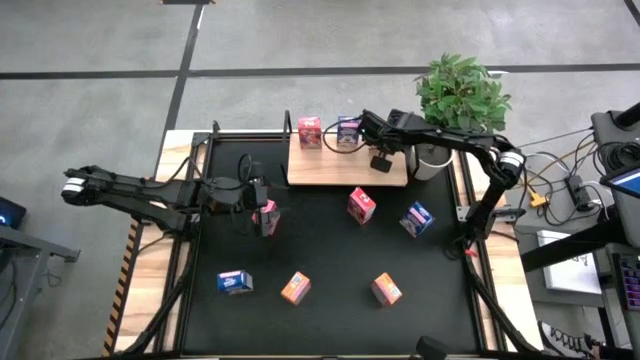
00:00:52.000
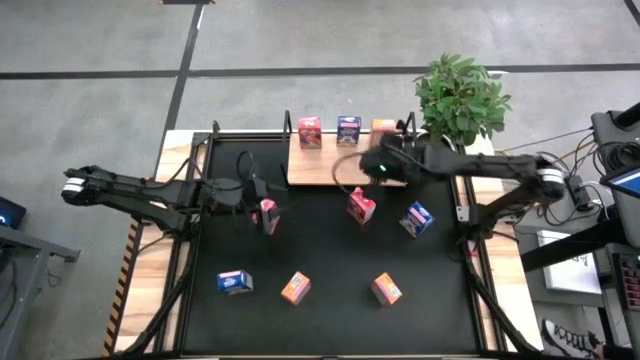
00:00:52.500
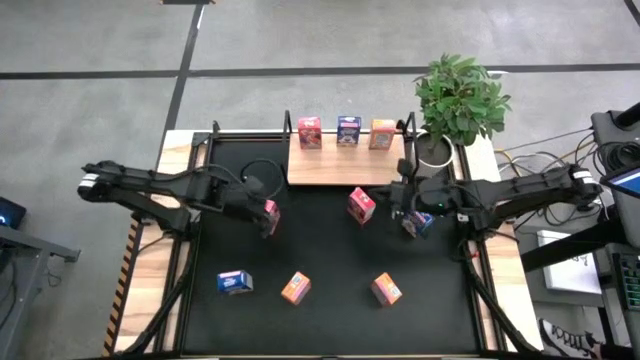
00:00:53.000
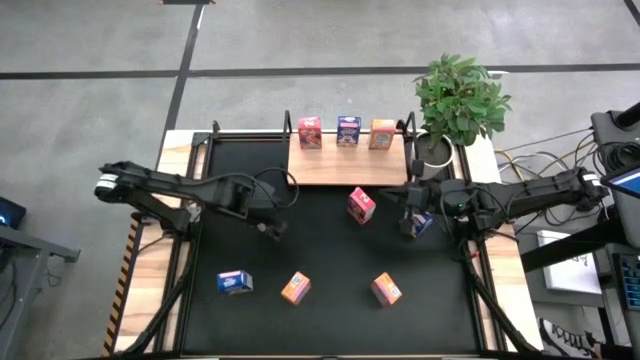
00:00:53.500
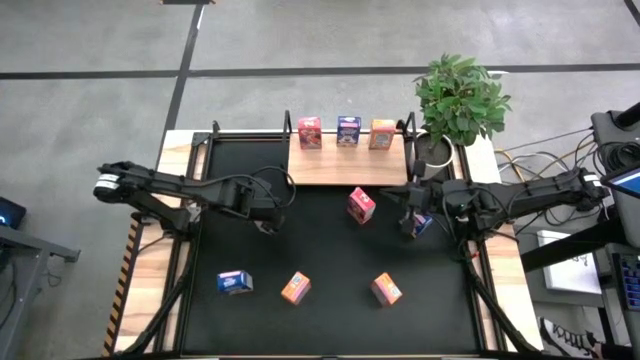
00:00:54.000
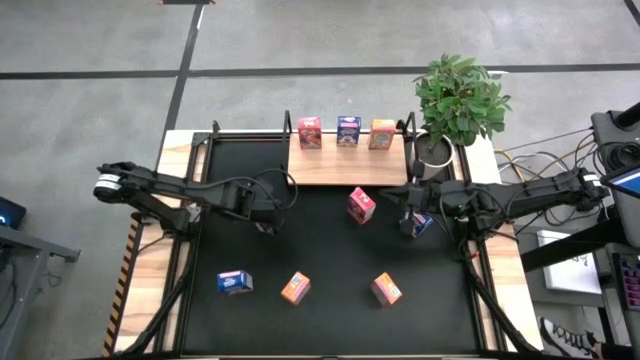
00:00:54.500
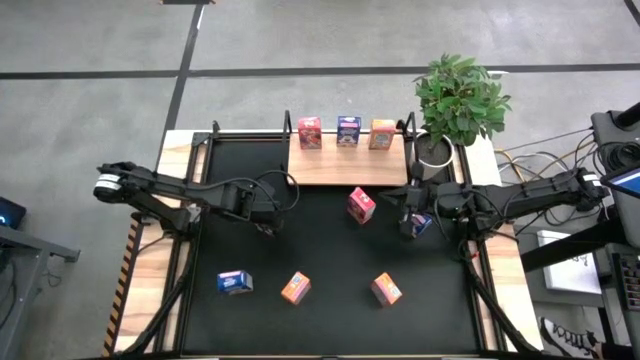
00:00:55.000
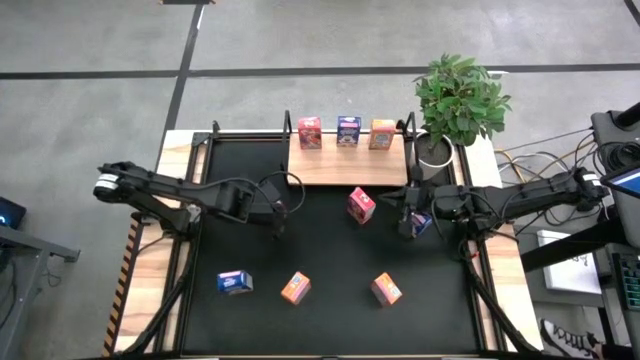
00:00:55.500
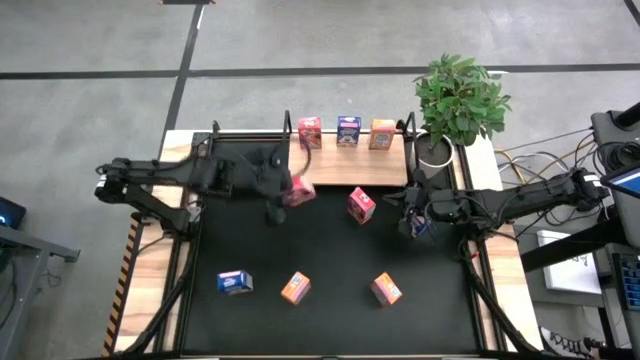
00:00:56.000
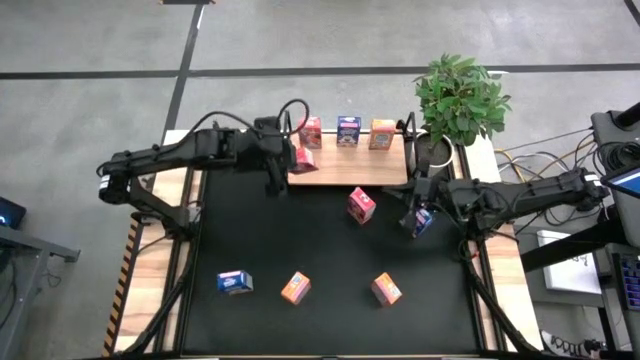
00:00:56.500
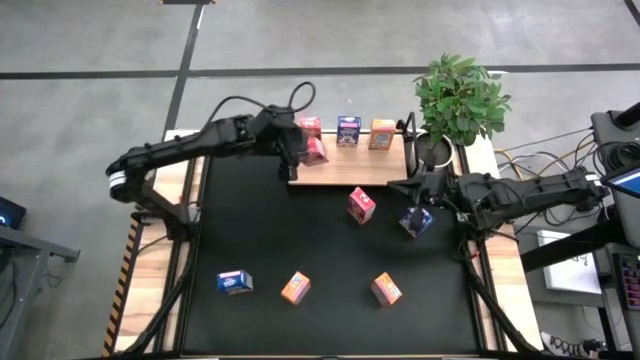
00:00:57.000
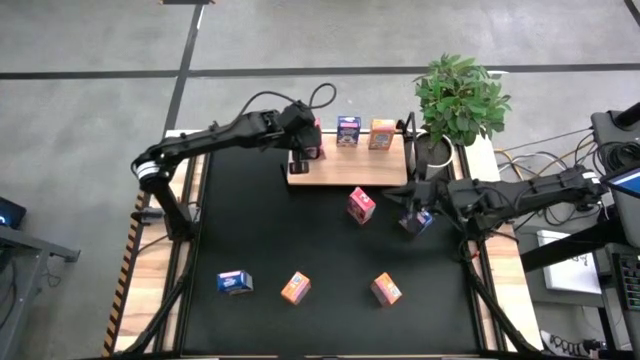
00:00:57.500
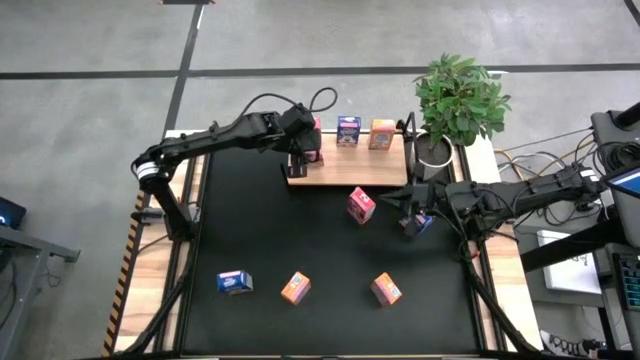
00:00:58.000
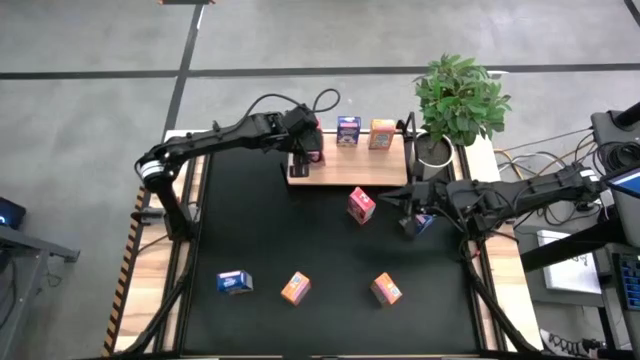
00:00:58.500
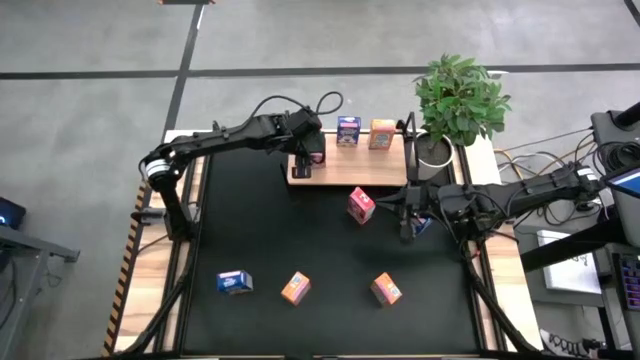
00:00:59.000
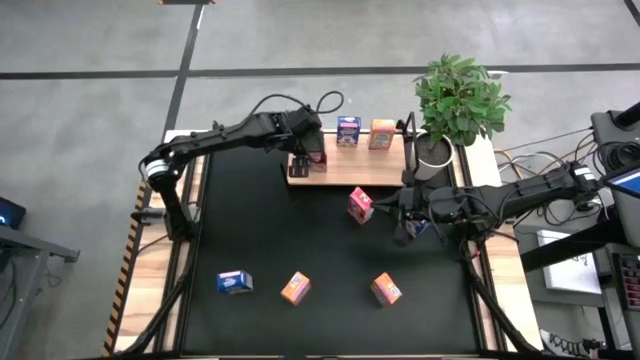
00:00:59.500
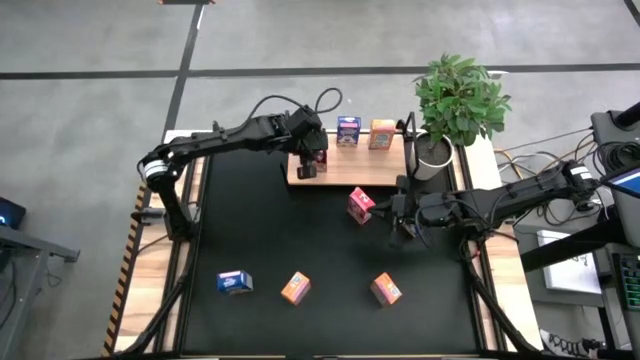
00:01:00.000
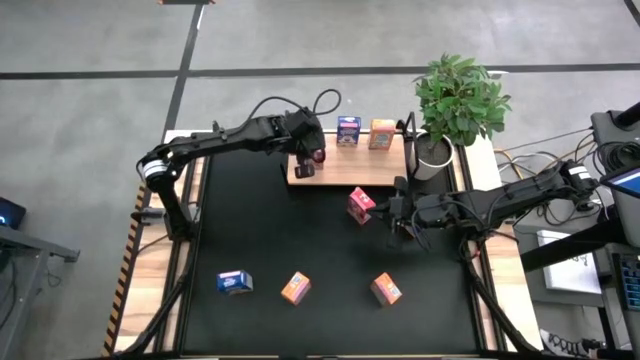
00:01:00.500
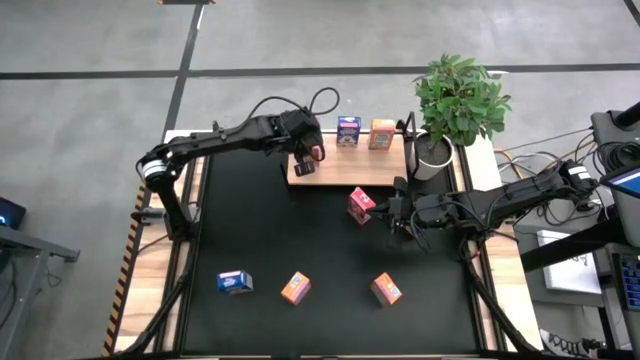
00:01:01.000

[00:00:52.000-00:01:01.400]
Task: Stack cereal on shelf
Put the left red cereal box aligned with the other red cereal box on the shelf

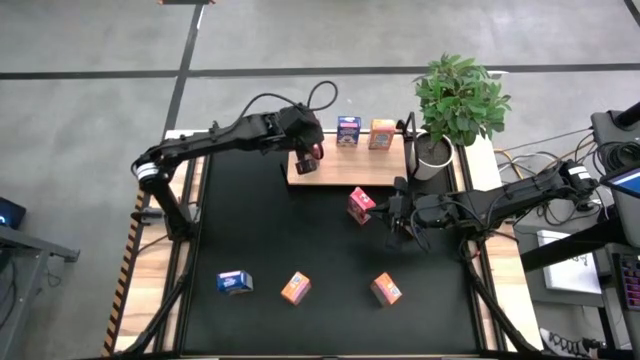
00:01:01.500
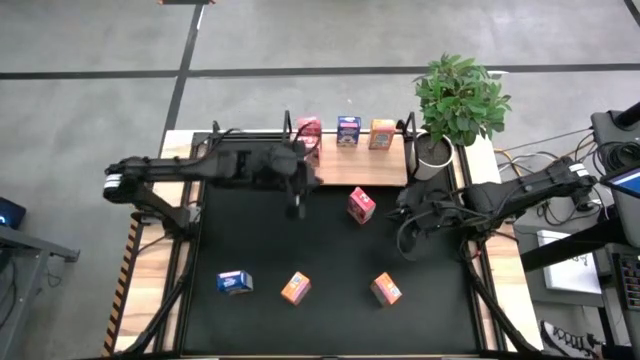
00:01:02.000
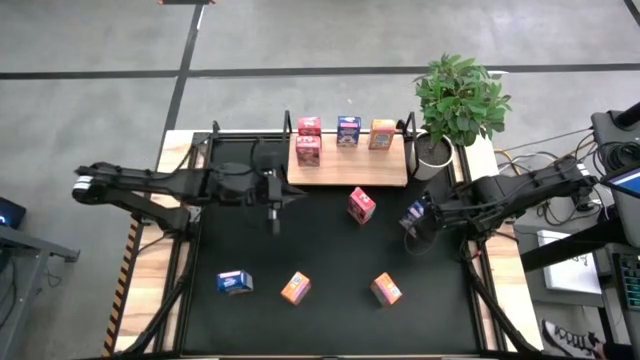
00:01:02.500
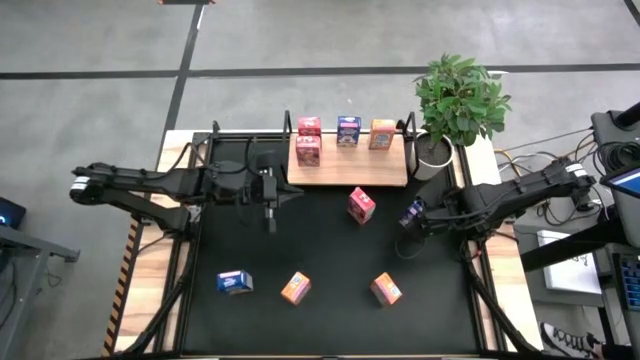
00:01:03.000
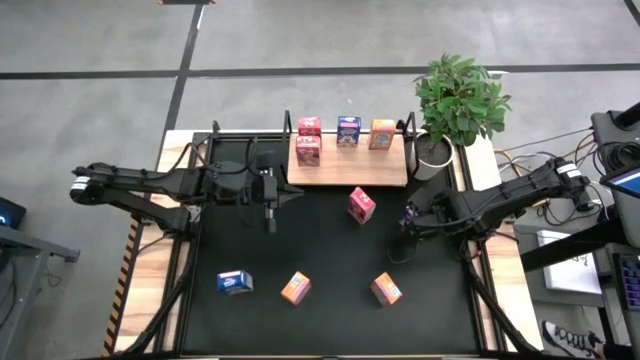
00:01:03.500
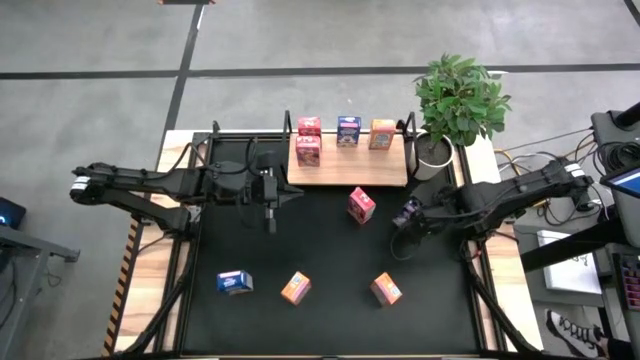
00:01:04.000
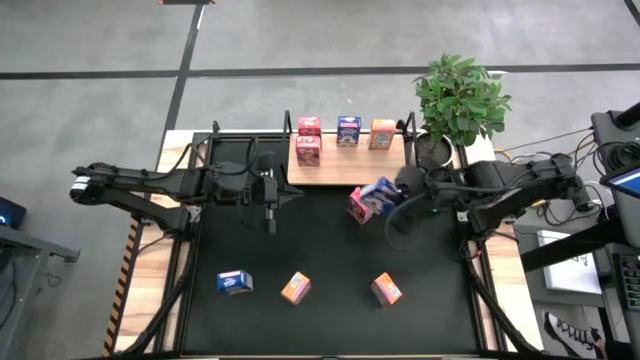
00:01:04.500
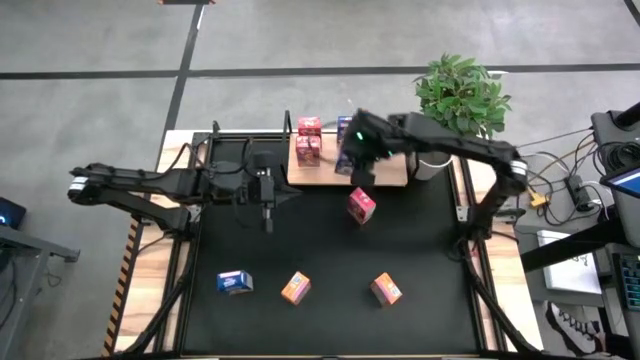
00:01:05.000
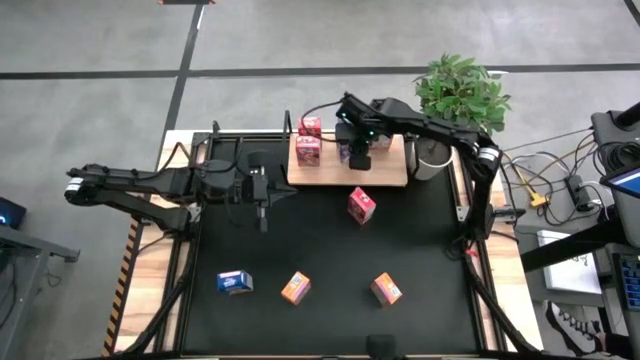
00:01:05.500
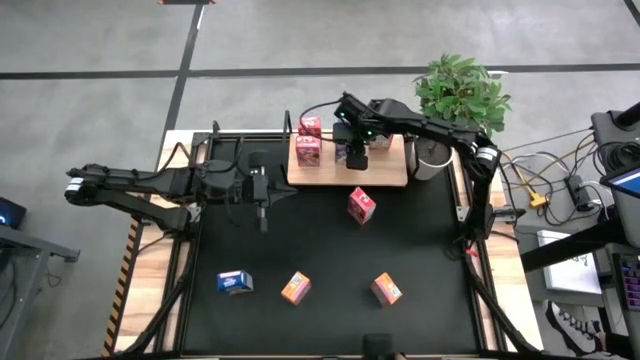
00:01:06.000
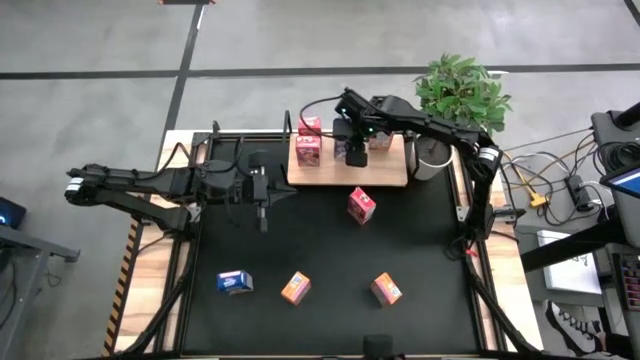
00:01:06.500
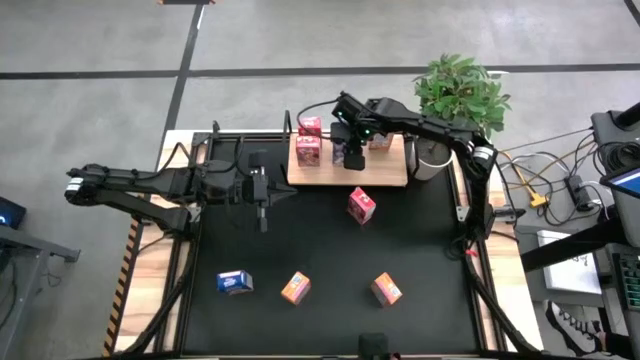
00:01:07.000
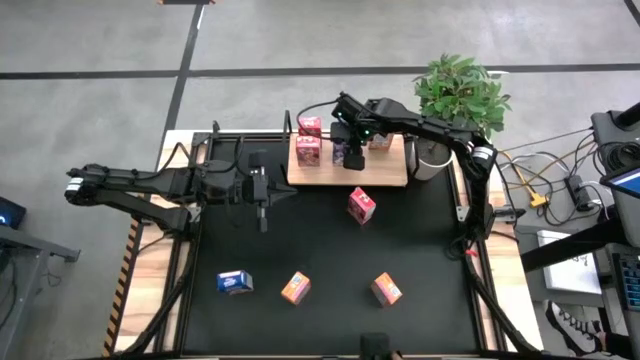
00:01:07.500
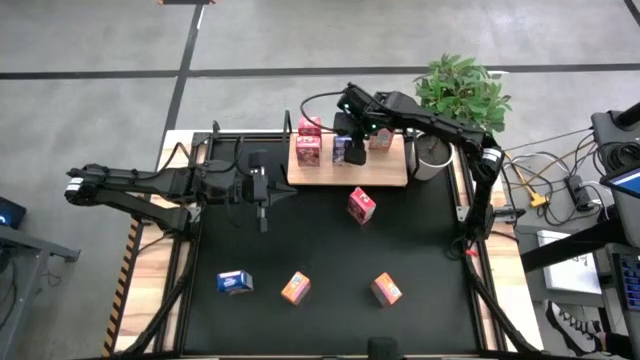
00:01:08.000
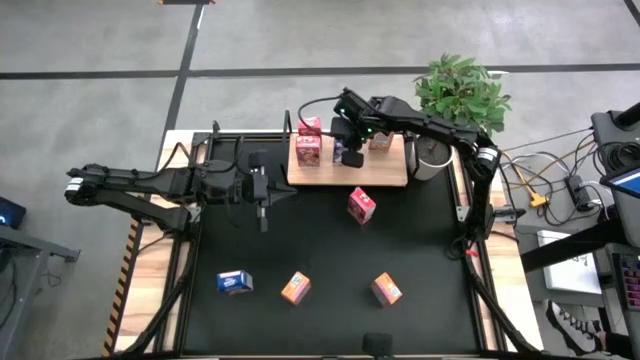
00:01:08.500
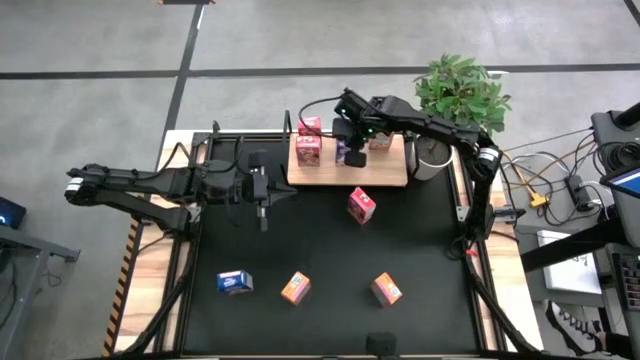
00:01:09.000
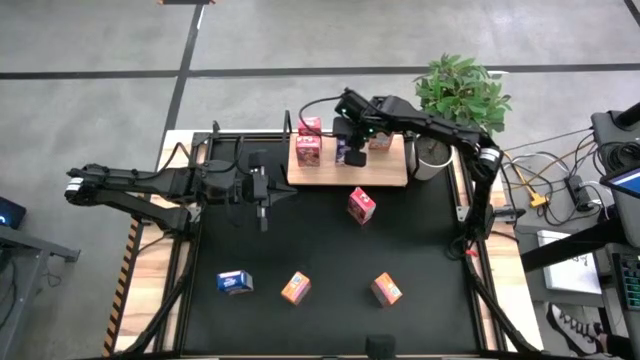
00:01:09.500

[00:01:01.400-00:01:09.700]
Put the top blue cereal box aligned with the other blue cereal box on the shelf

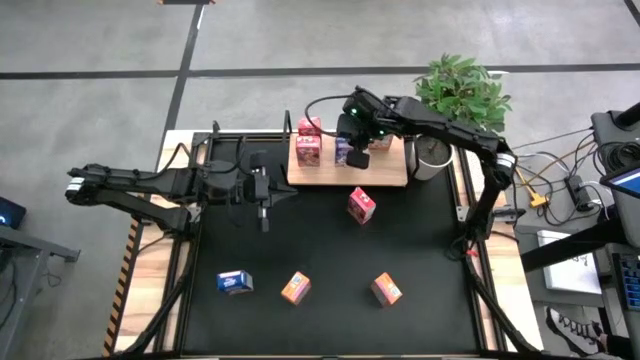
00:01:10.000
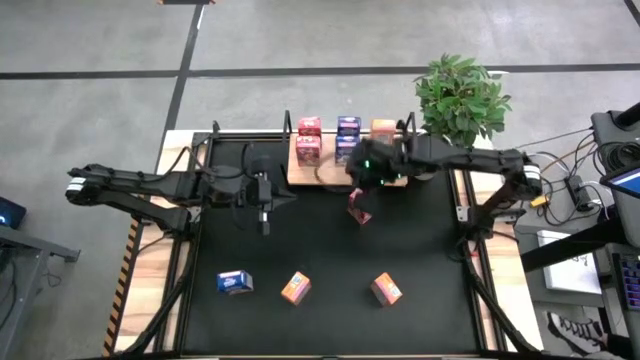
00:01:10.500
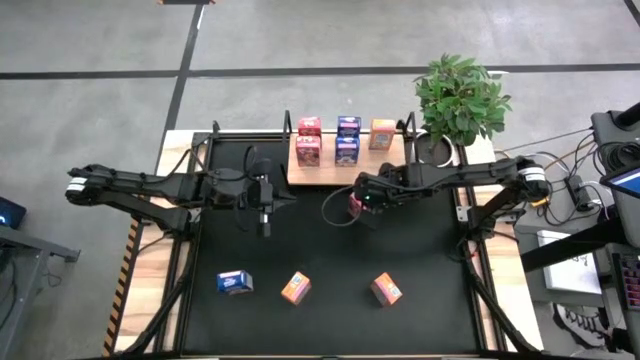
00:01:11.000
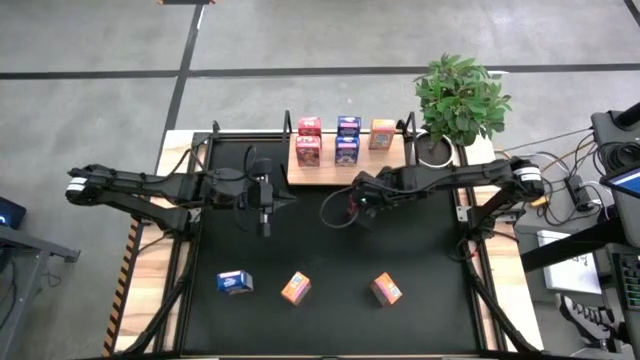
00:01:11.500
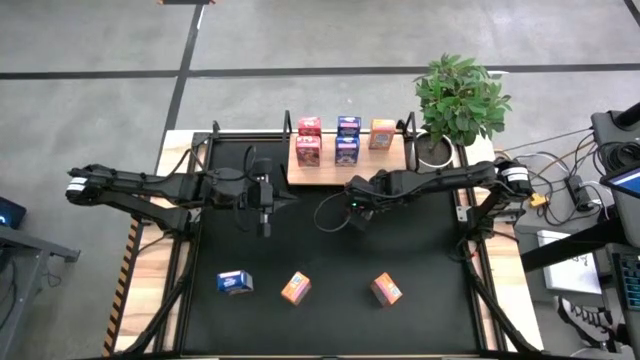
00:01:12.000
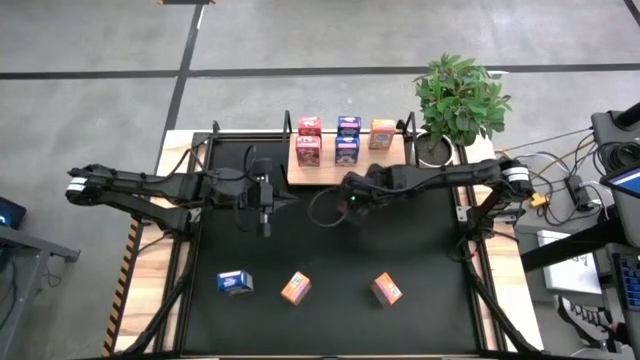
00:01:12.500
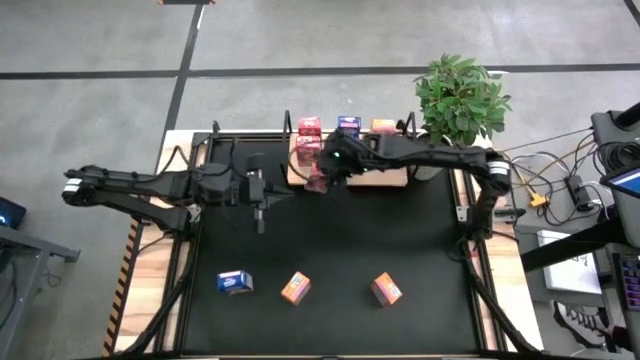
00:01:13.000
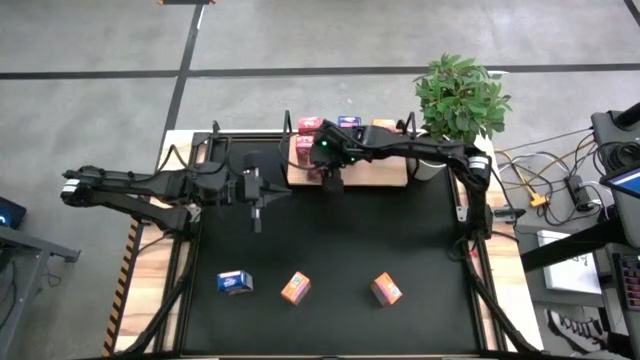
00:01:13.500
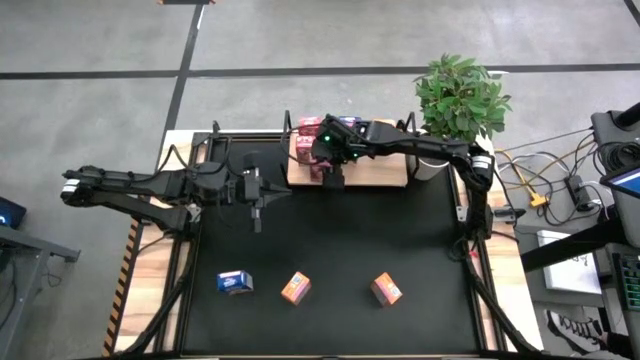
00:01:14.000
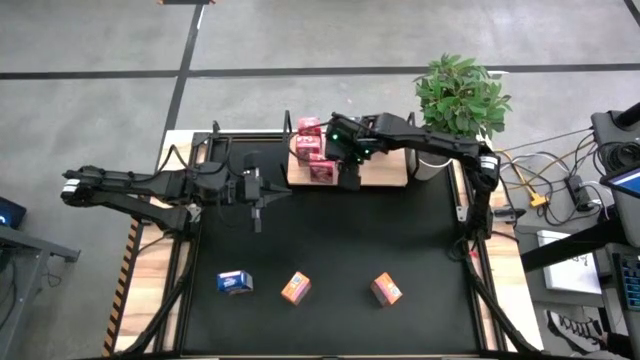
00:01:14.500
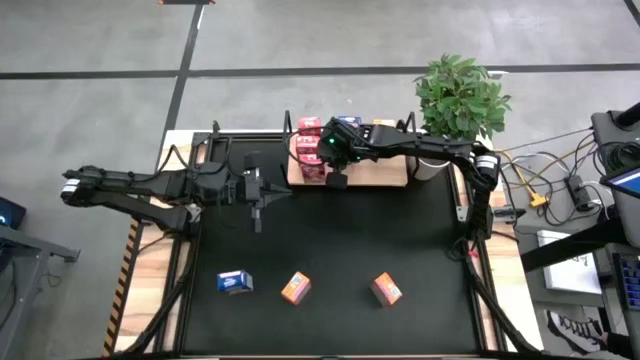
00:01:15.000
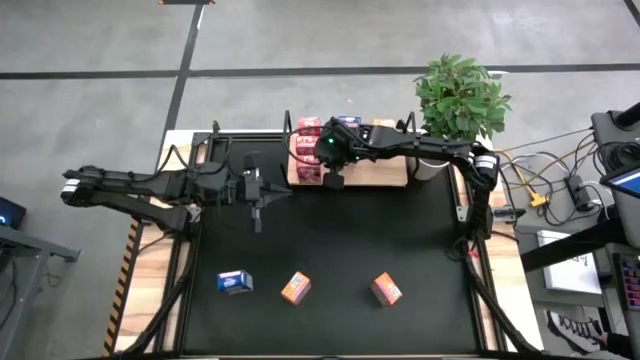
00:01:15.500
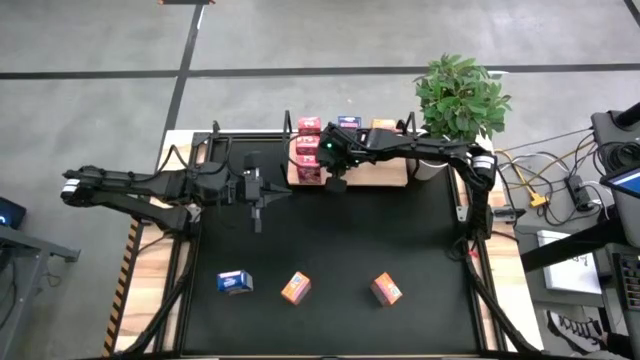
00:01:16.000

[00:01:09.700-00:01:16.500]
Put the red cereal box aligned with the other red cereal boxes on the shelf
